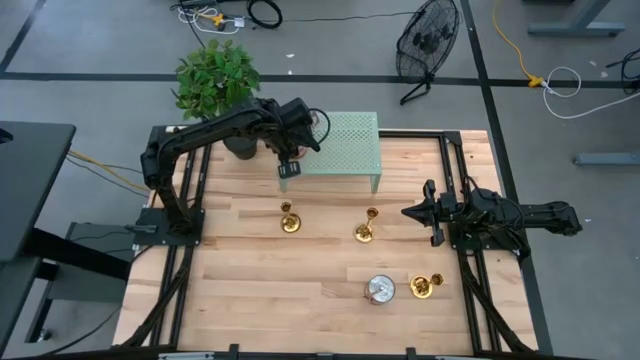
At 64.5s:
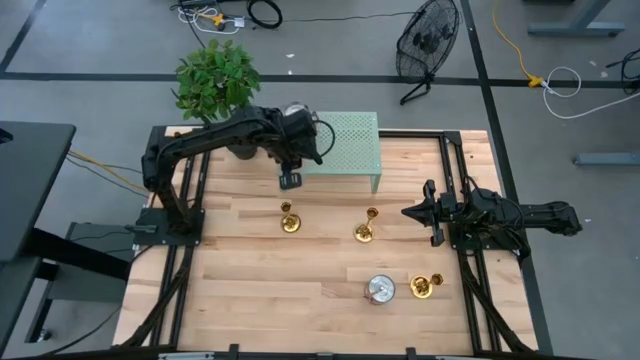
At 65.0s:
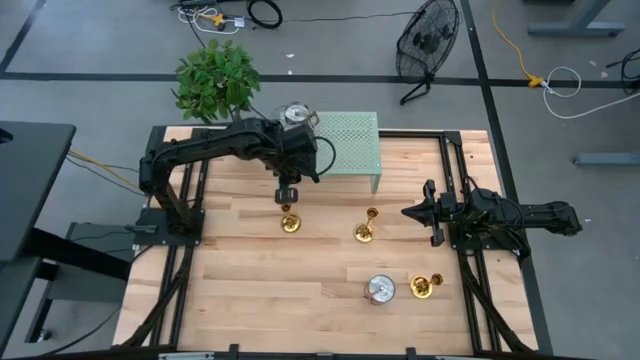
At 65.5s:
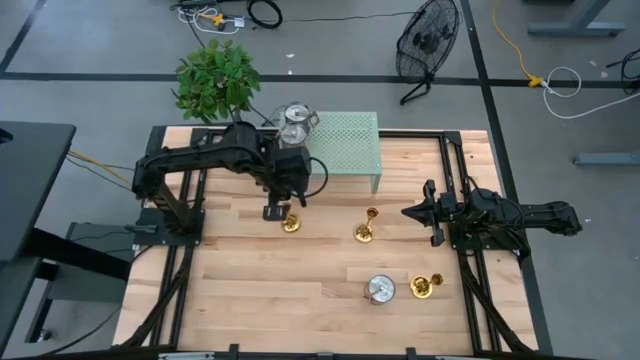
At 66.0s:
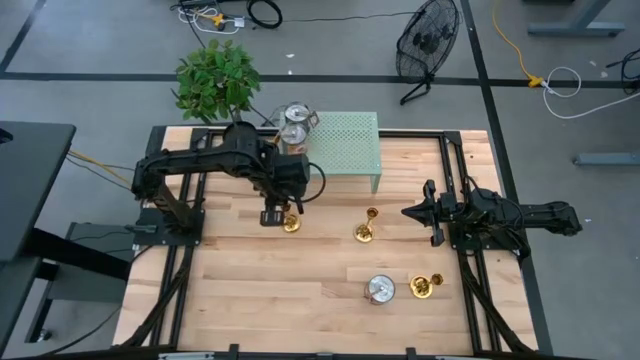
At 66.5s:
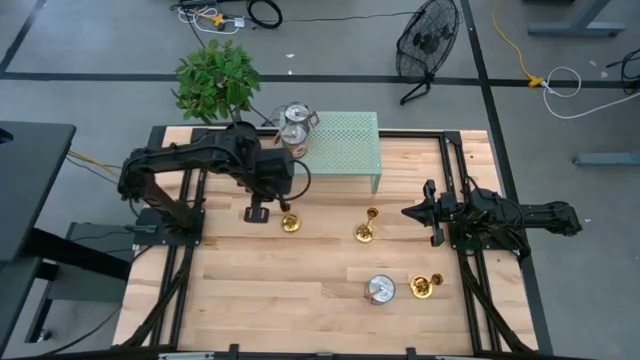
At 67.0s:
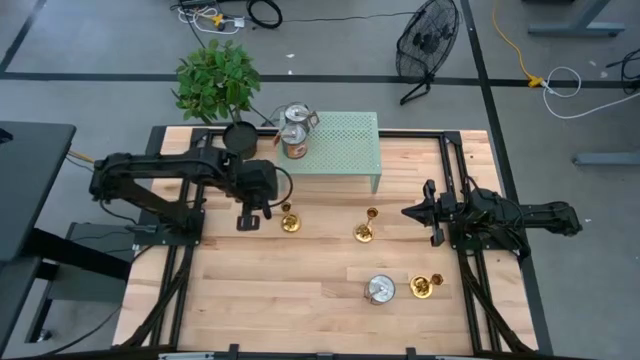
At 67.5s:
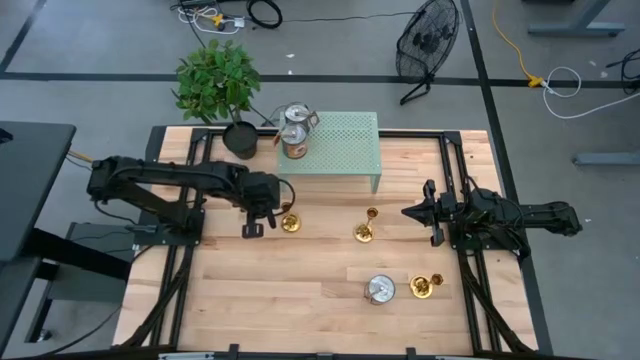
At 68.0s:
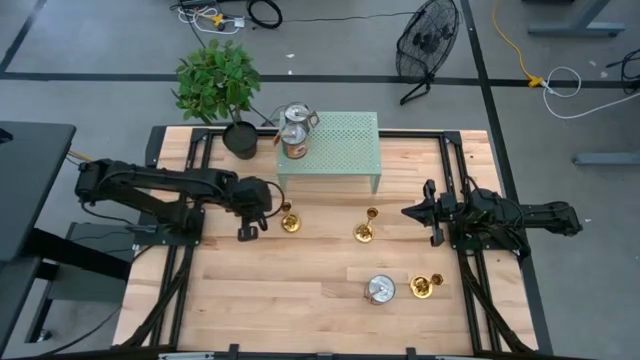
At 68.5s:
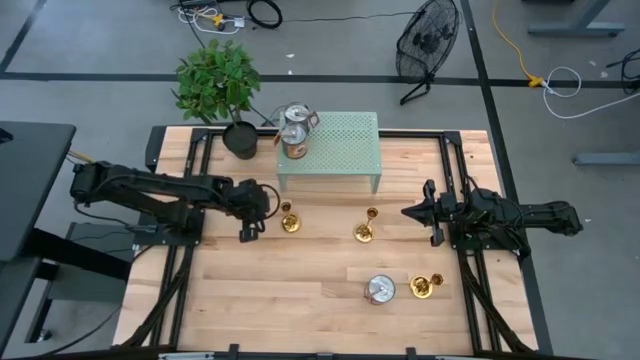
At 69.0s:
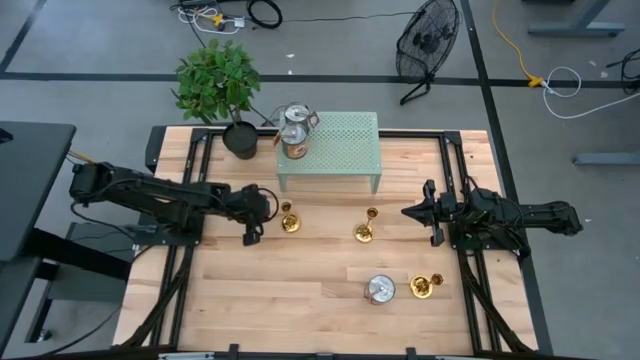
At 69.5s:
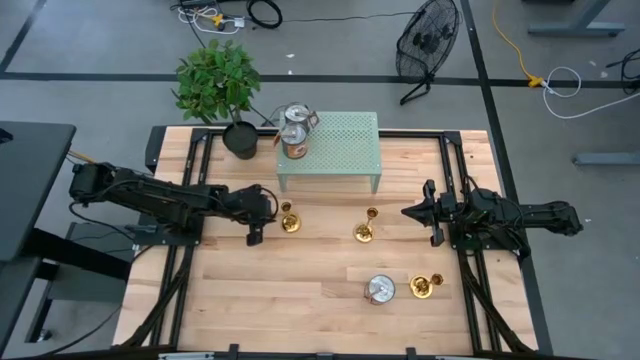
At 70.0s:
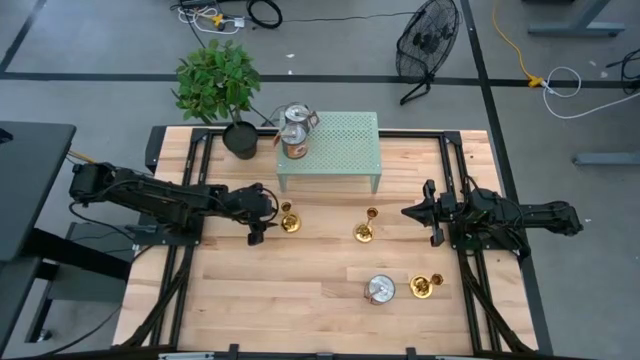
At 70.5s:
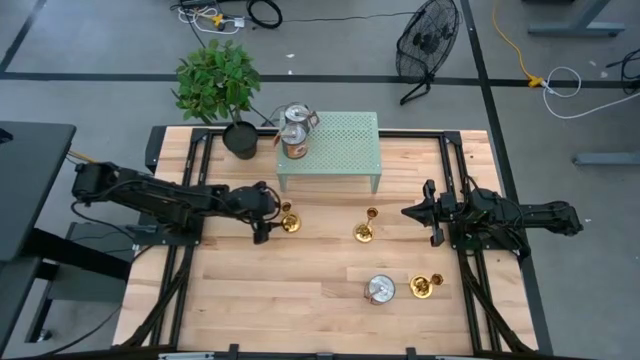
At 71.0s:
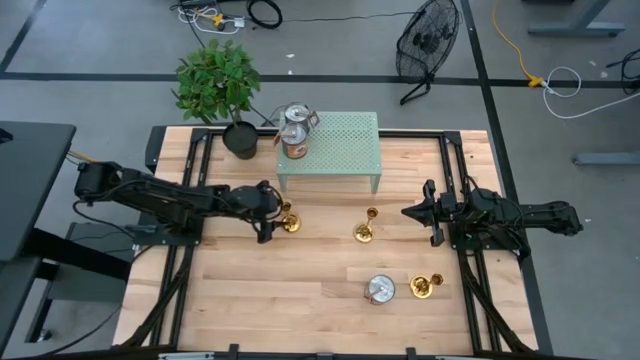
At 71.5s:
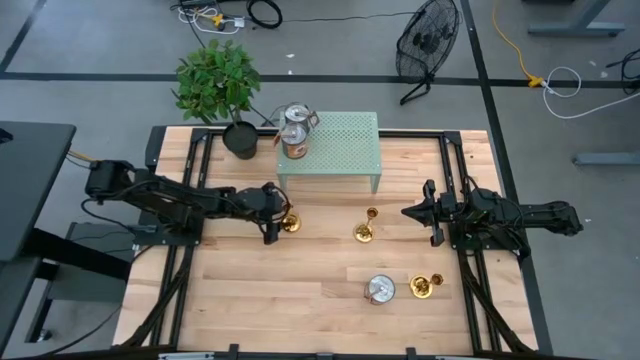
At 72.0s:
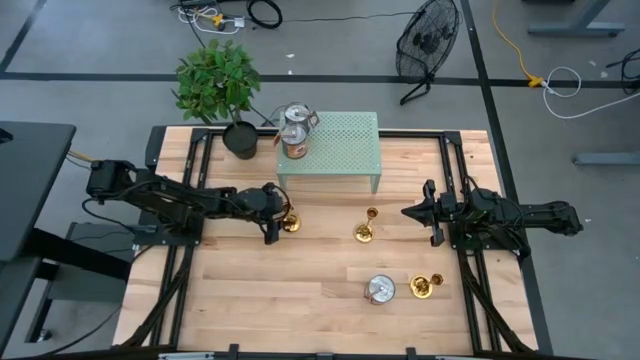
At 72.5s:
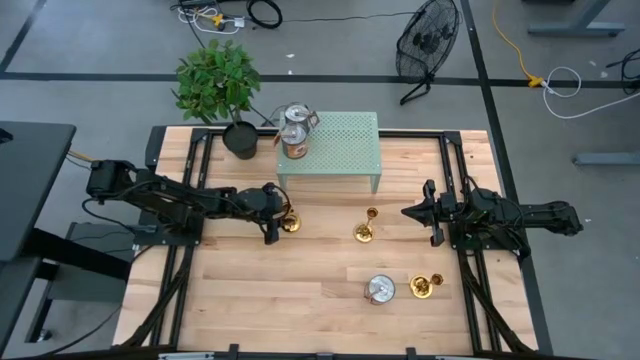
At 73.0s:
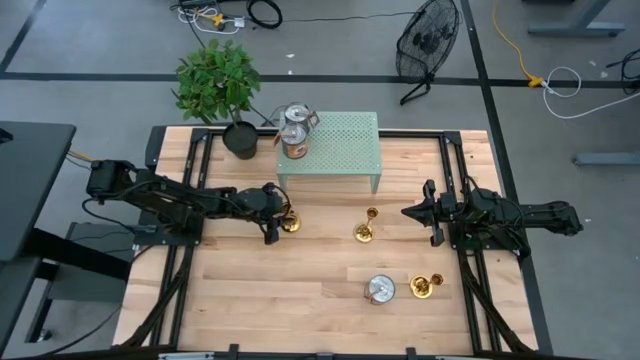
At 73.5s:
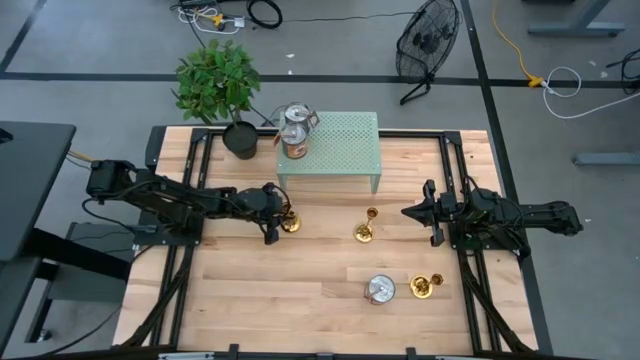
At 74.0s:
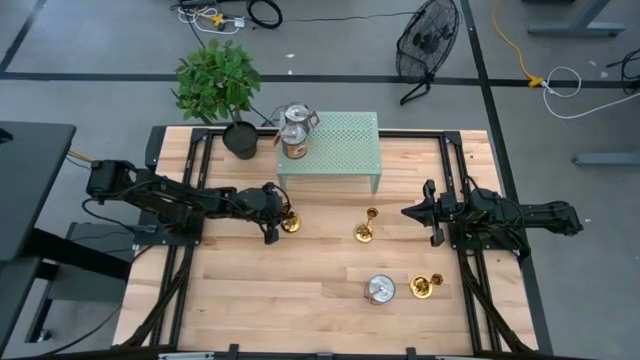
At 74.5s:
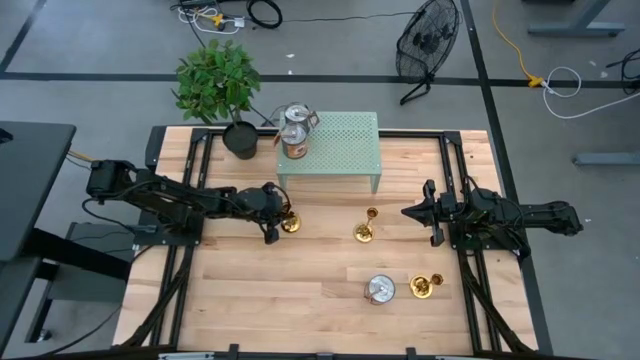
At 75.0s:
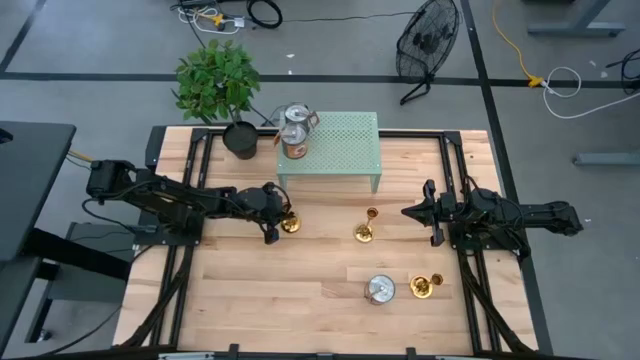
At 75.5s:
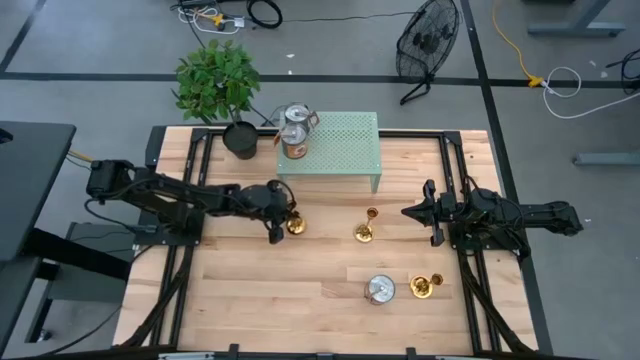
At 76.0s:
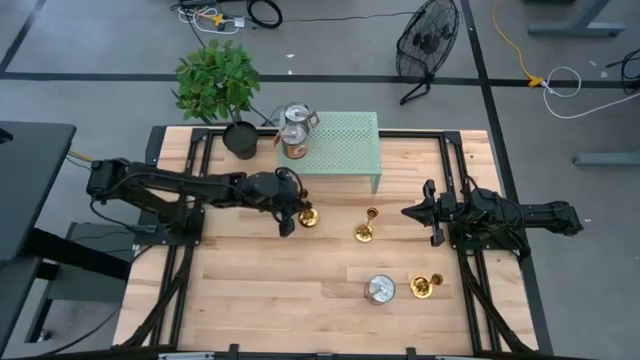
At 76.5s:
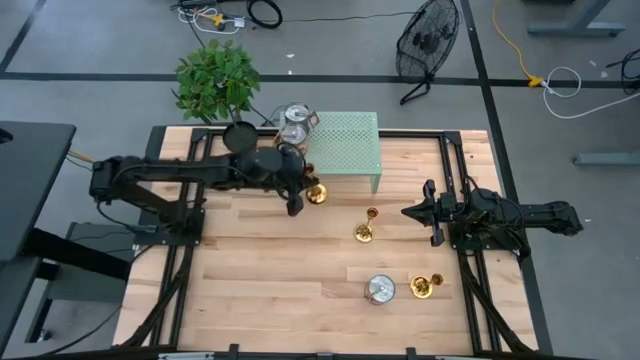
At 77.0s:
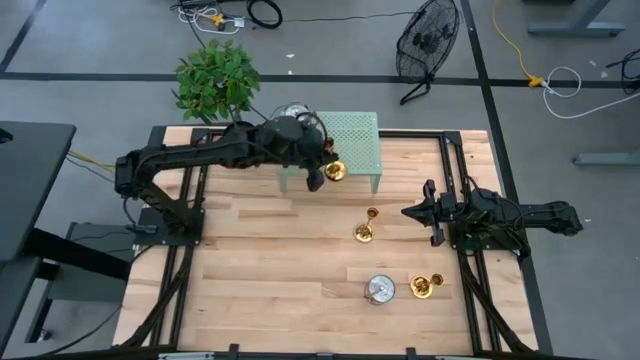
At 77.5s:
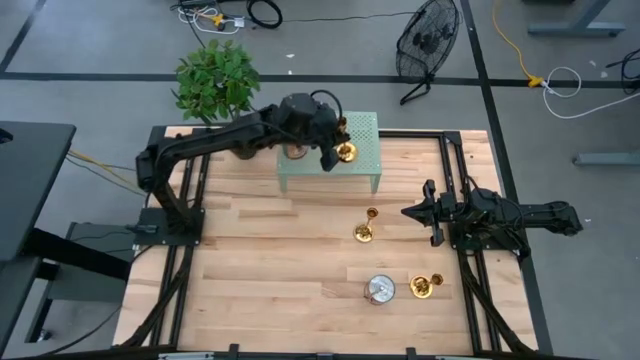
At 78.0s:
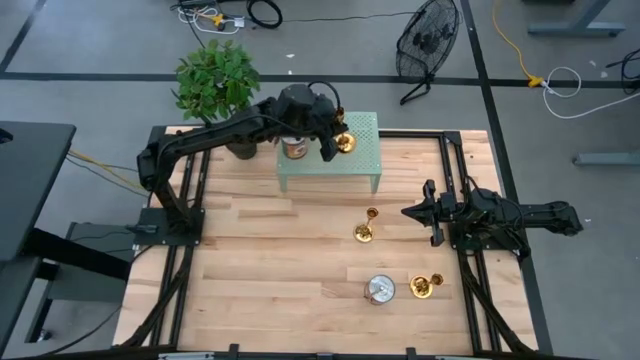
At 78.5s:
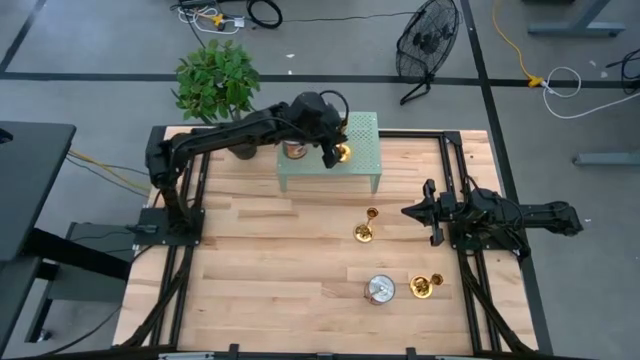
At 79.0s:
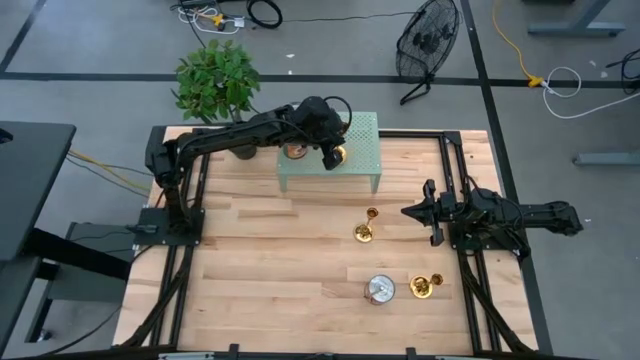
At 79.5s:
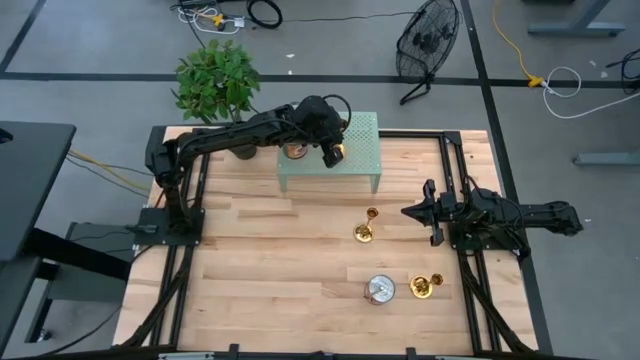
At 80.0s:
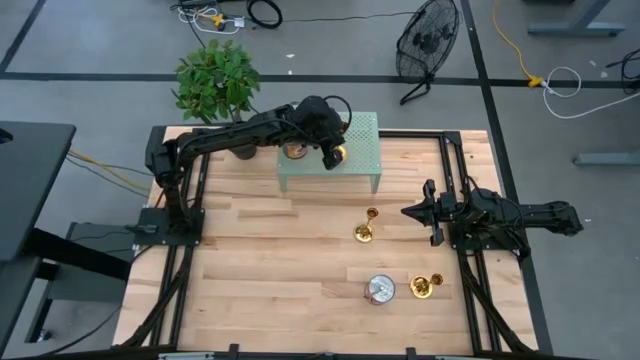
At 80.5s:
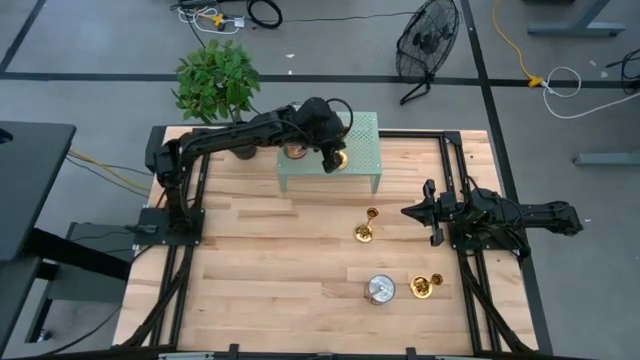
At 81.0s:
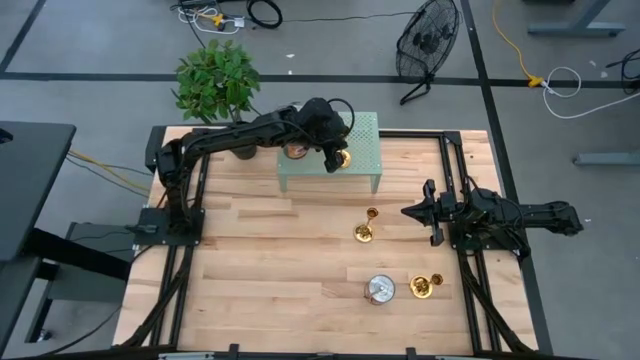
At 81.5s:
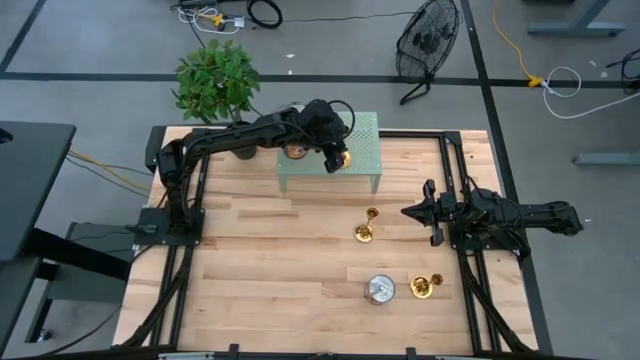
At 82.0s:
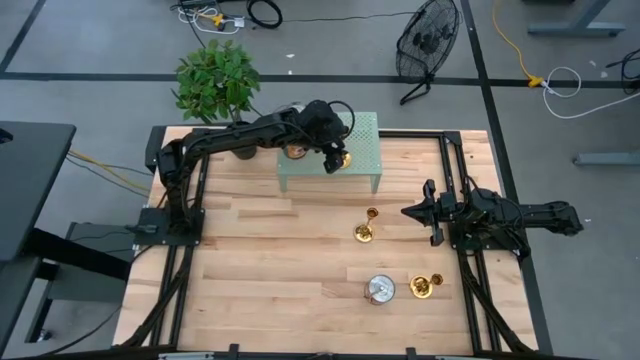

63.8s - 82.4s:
Task: Pick & Place candle stick holders
Put the top left gold candle holder on the shelf

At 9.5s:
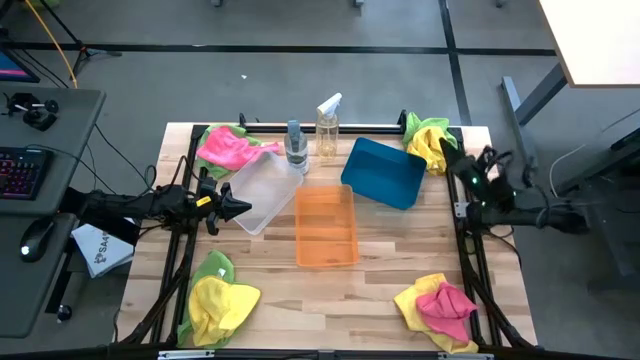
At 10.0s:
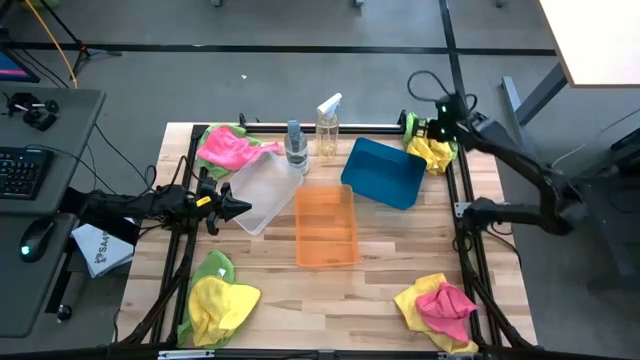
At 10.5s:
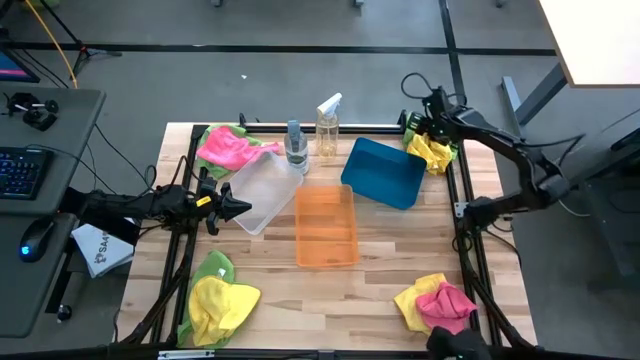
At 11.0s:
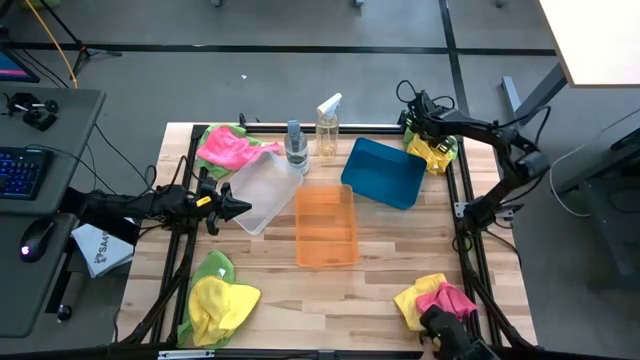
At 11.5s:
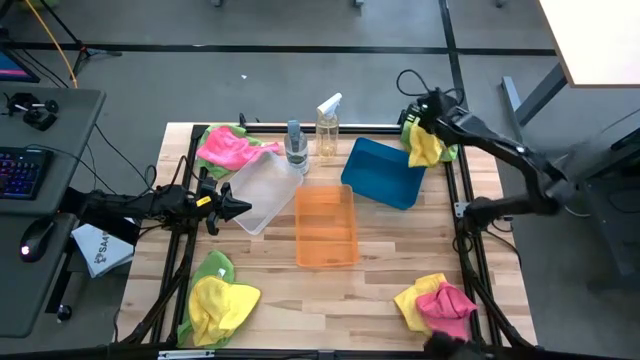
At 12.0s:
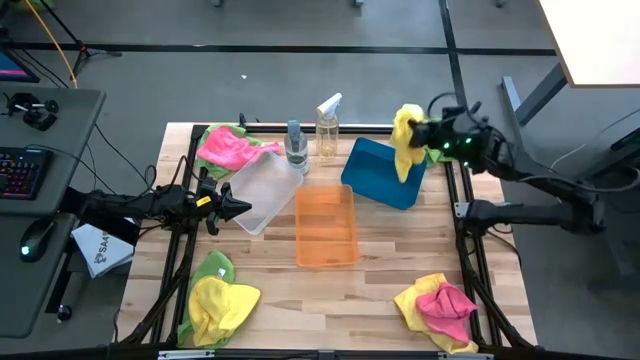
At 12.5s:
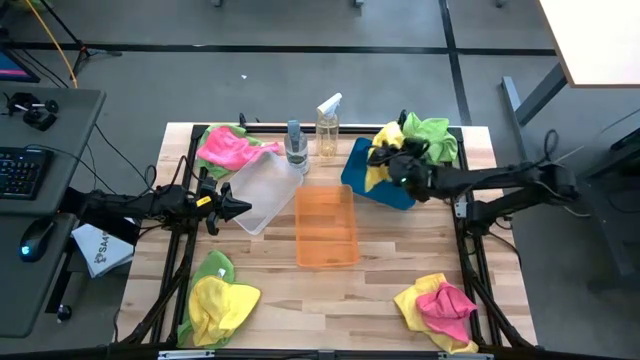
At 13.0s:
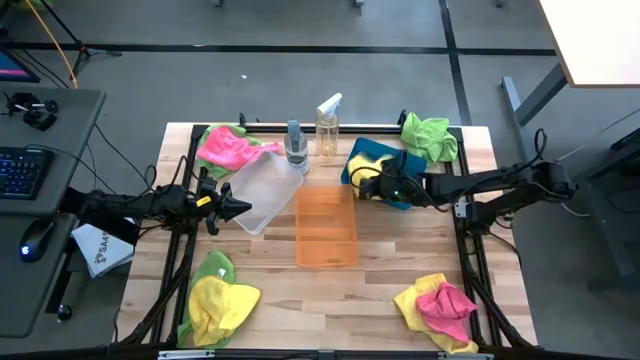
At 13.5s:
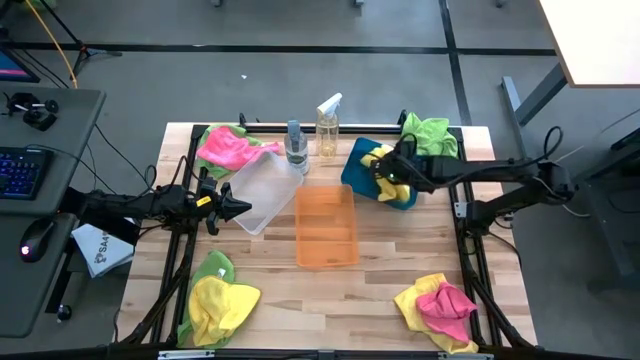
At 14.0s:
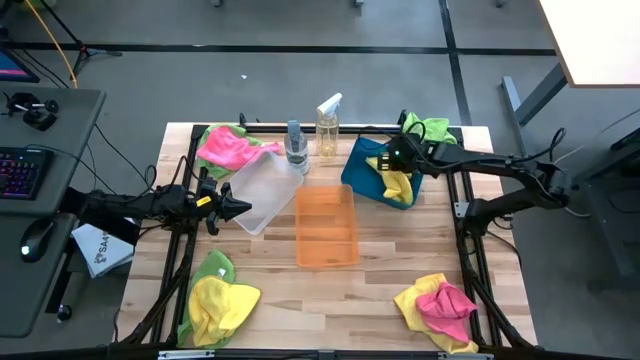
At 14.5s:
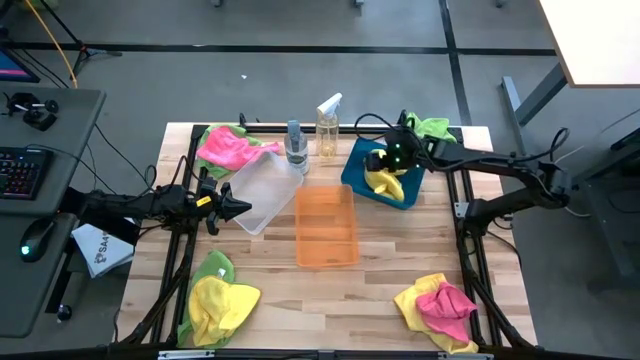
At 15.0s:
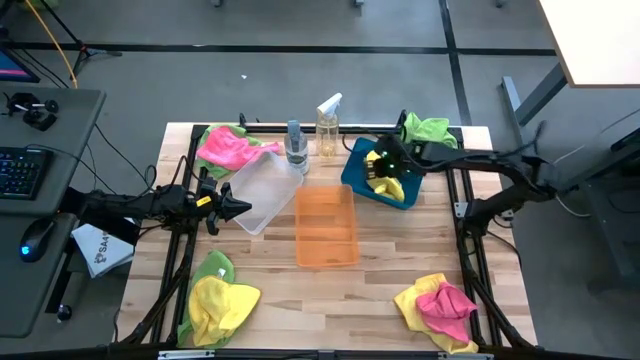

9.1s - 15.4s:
Task: Sort microfiber towel by color & place in baskets
Put the top yellow microfiber towel into the blue bin
